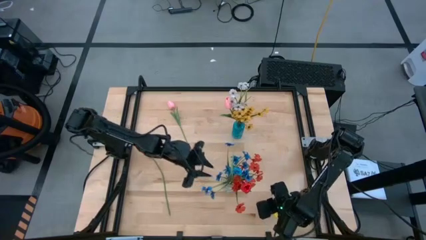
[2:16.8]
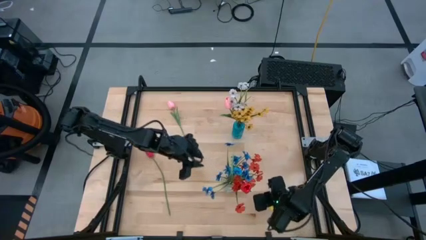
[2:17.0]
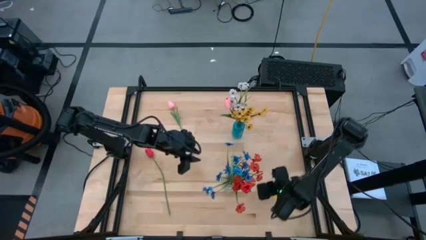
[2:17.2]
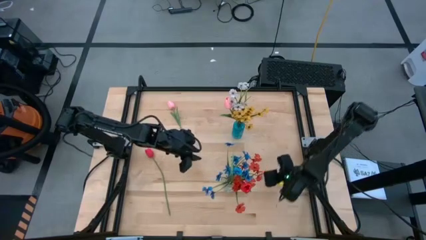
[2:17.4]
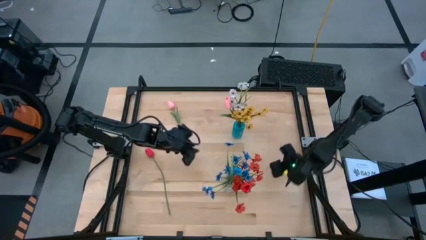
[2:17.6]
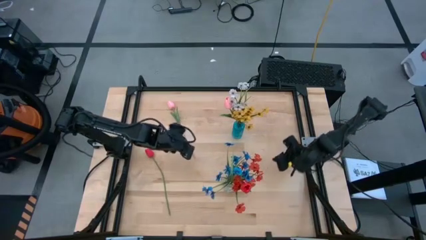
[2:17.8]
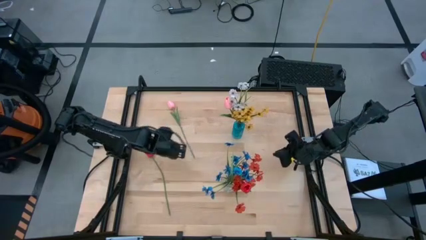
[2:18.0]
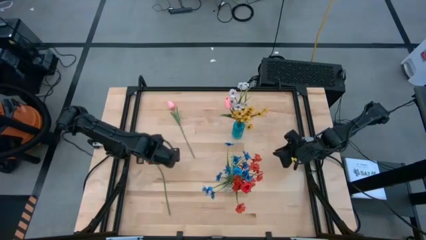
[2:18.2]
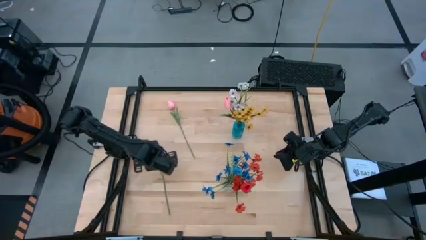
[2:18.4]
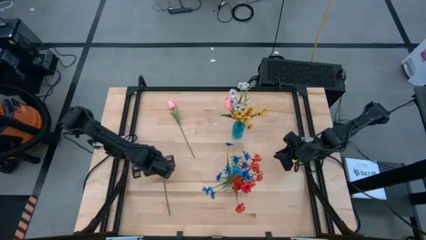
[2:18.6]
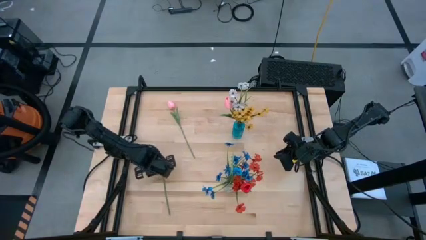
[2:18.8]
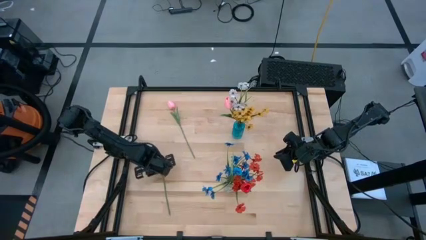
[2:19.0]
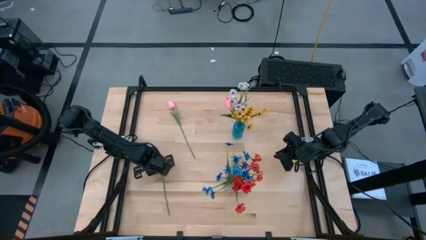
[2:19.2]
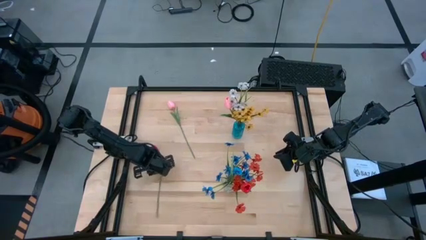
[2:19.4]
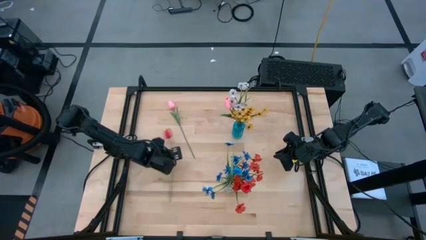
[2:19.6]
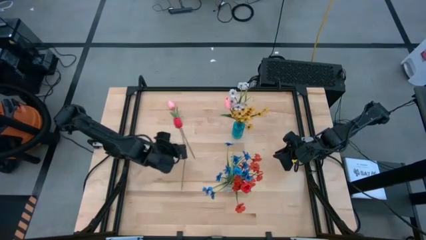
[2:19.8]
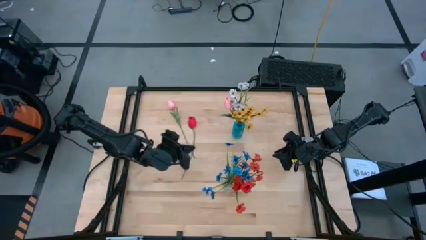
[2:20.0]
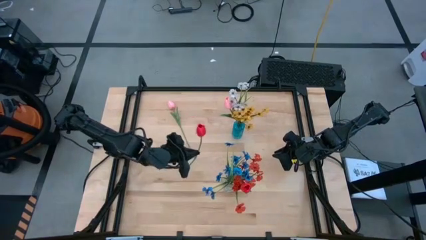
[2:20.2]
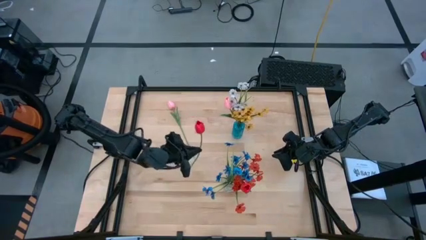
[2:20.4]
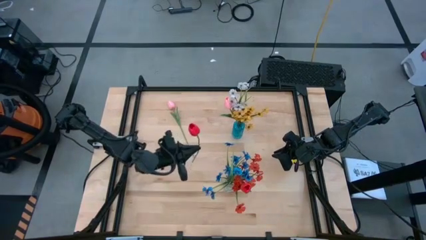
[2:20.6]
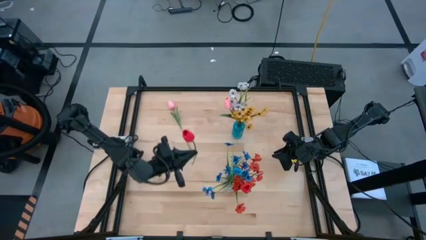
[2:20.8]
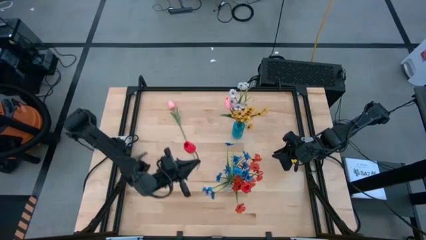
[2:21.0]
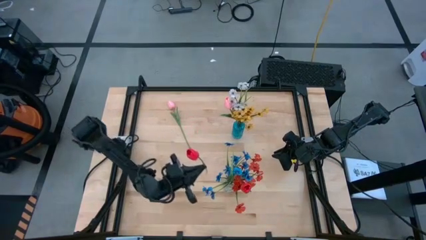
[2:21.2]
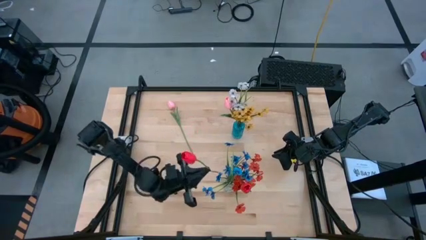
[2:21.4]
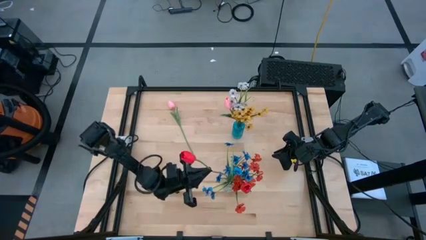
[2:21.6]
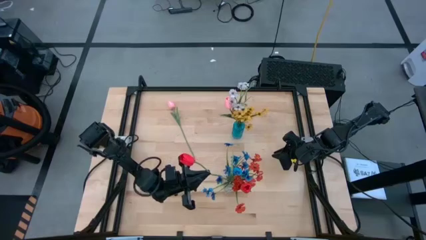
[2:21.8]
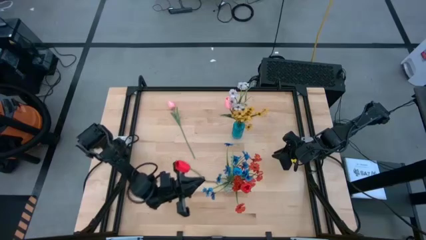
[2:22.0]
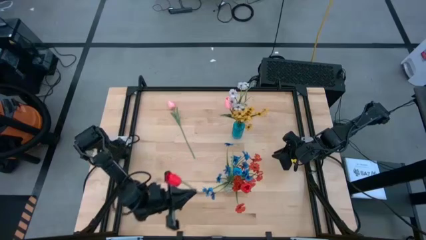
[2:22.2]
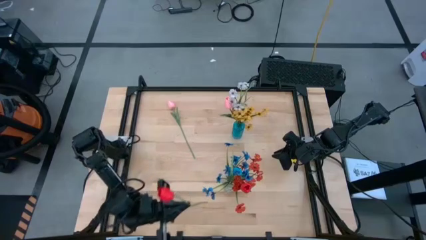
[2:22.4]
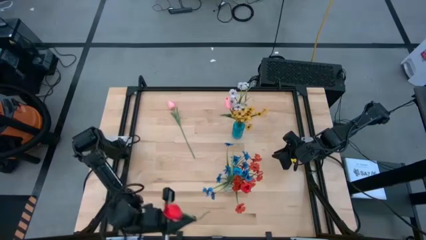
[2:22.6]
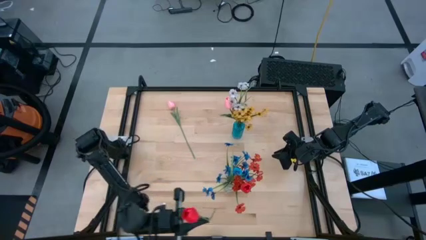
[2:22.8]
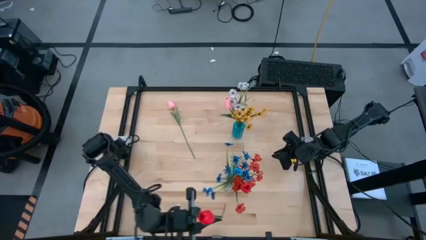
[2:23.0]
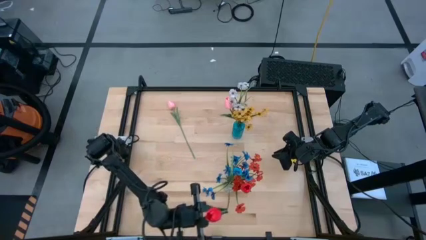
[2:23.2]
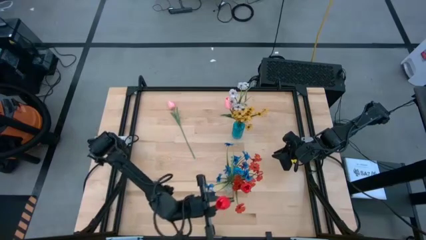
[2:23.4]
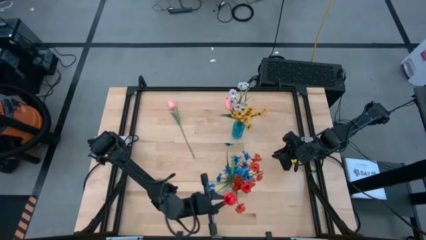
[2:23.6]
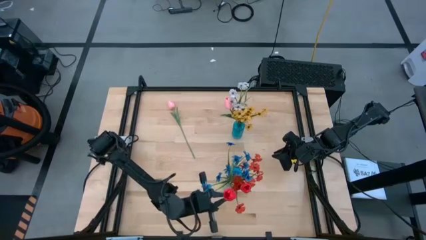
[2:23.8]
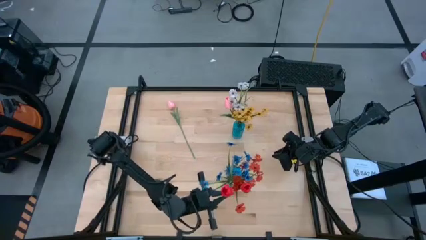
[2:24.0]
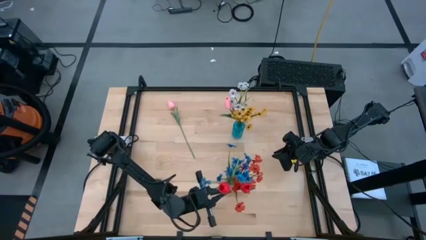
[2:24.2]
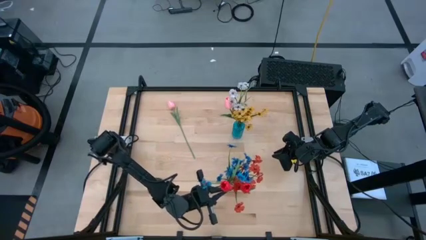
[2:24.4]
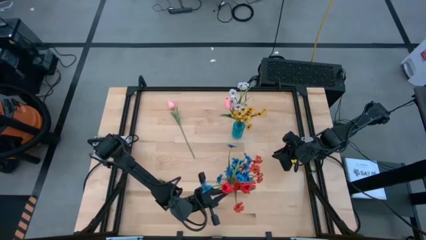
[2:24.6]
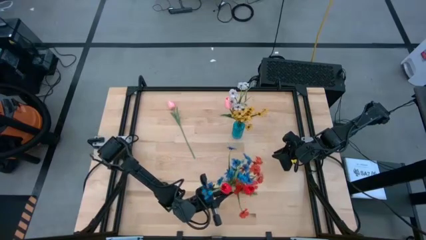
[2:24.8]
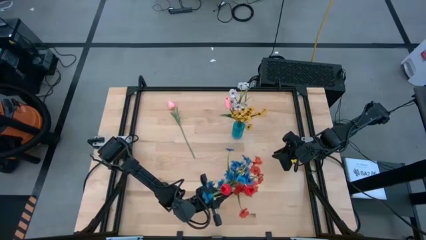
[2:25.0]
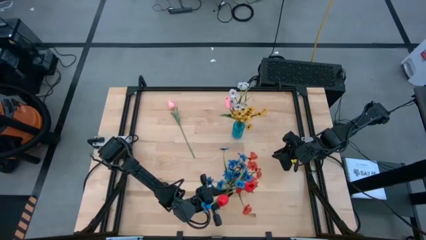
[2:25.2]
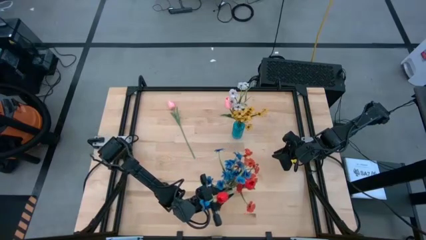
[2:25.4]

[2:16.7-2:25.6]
Task: Sort flowers into vase by color
Put the red tulip into the transparent vase

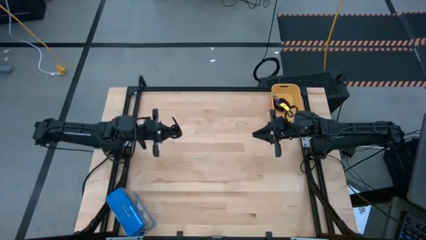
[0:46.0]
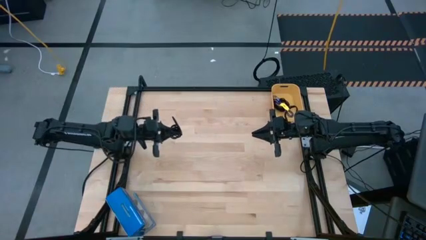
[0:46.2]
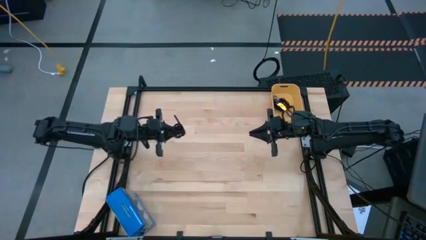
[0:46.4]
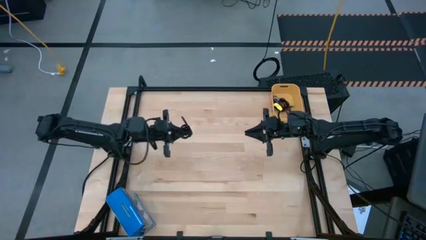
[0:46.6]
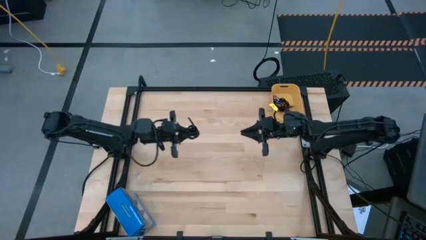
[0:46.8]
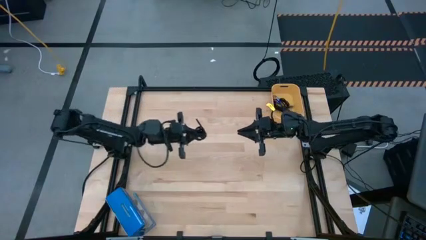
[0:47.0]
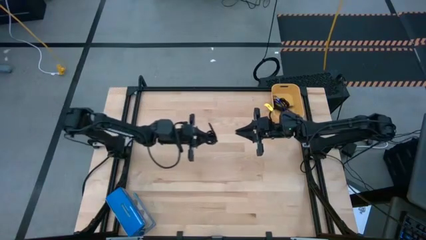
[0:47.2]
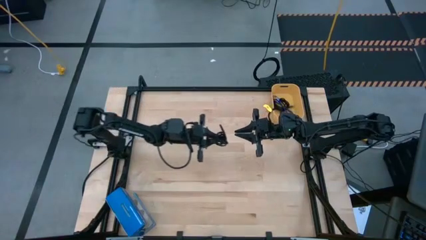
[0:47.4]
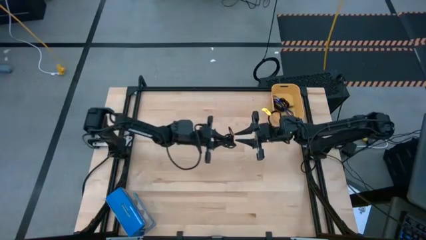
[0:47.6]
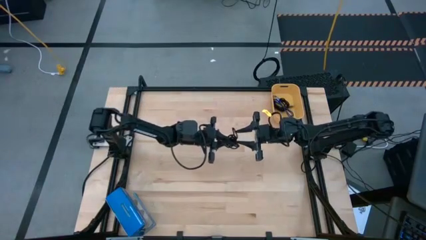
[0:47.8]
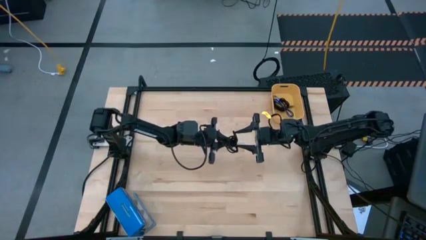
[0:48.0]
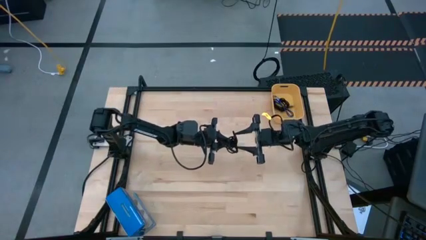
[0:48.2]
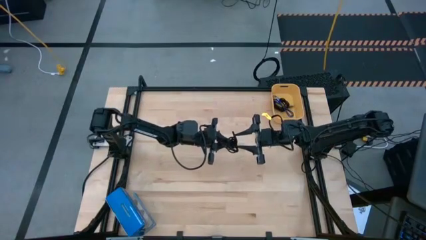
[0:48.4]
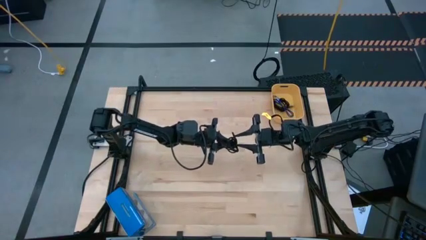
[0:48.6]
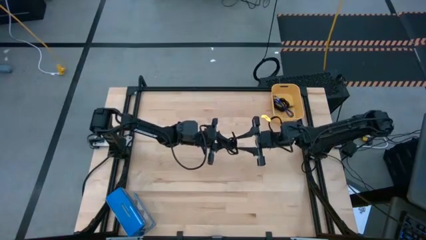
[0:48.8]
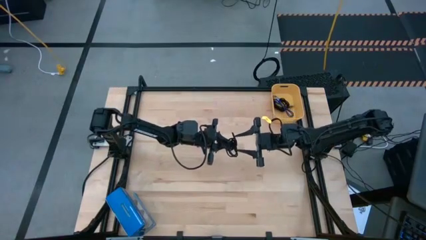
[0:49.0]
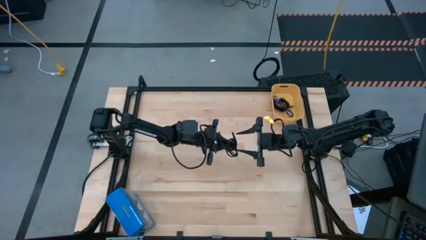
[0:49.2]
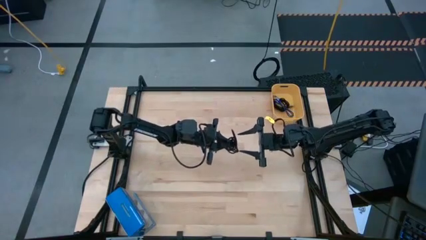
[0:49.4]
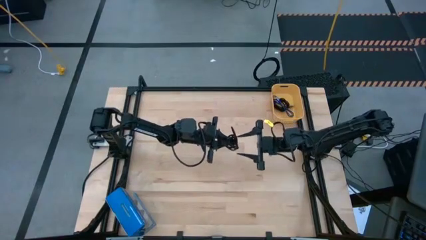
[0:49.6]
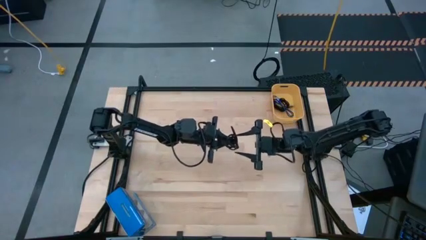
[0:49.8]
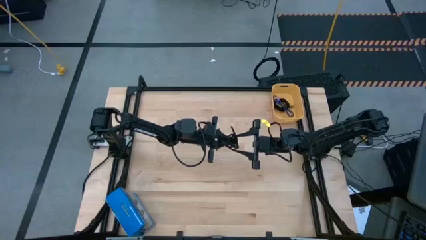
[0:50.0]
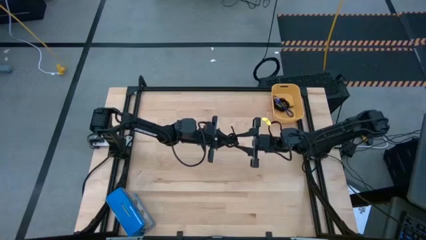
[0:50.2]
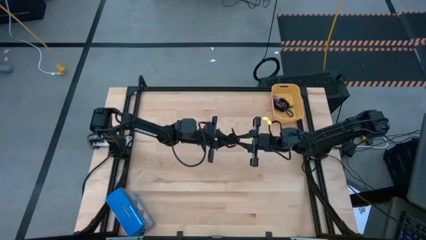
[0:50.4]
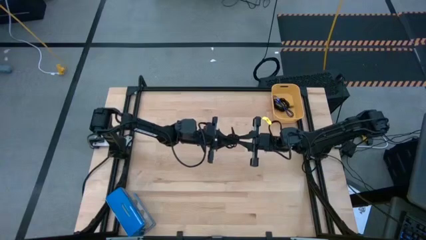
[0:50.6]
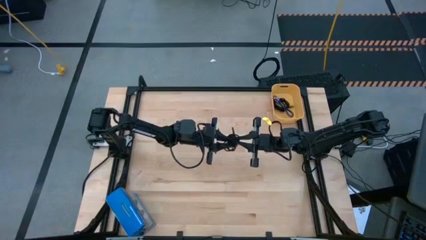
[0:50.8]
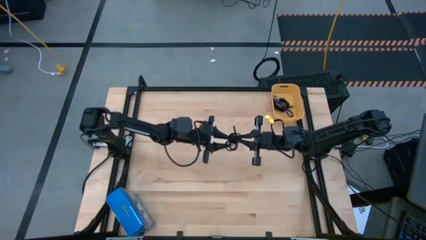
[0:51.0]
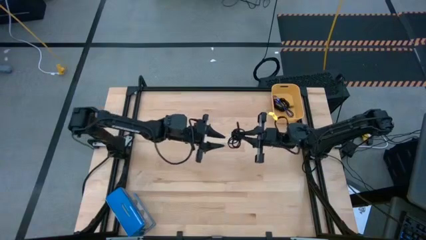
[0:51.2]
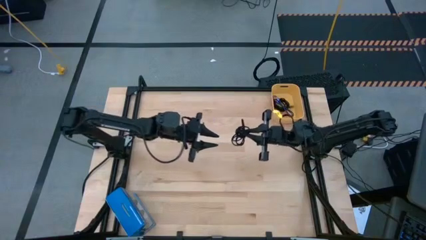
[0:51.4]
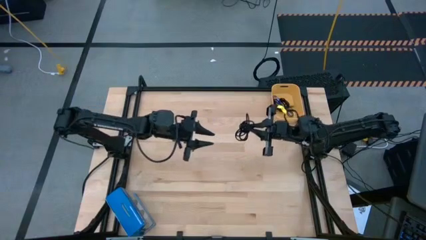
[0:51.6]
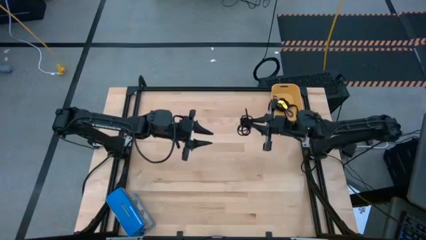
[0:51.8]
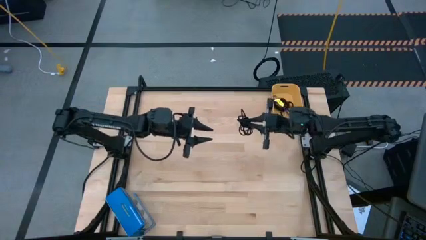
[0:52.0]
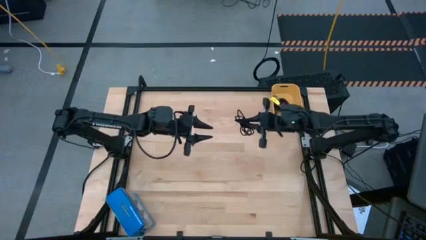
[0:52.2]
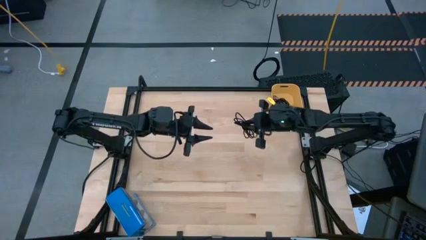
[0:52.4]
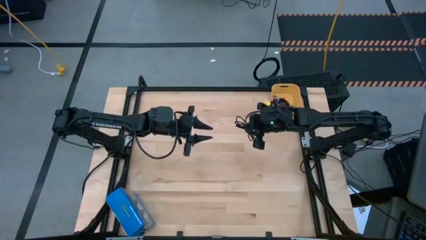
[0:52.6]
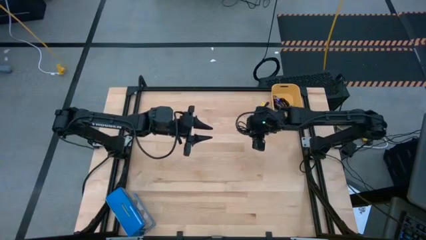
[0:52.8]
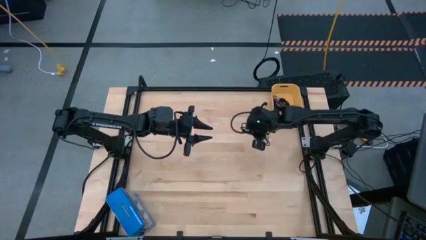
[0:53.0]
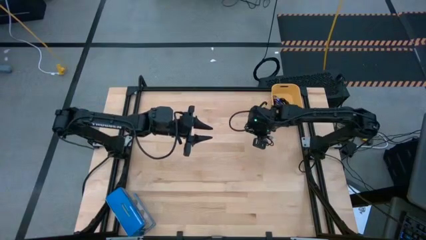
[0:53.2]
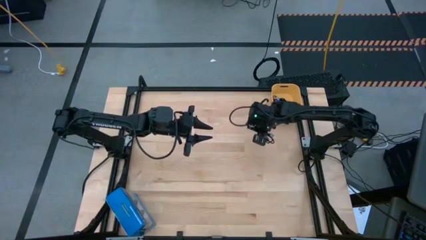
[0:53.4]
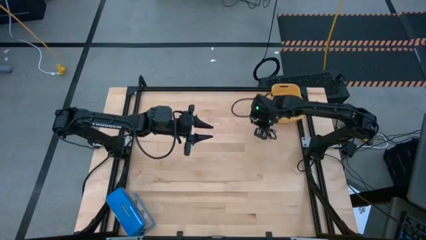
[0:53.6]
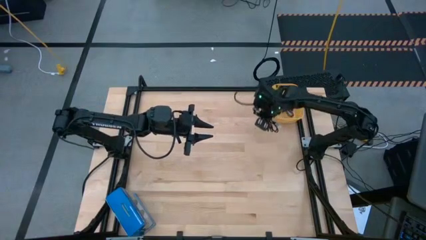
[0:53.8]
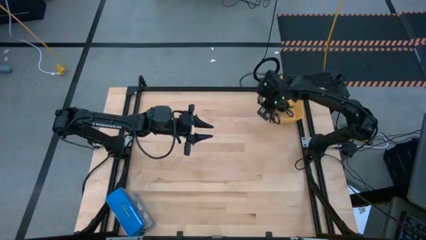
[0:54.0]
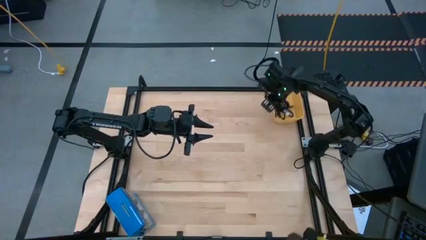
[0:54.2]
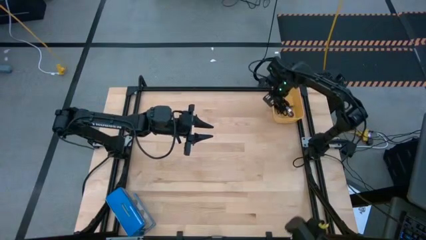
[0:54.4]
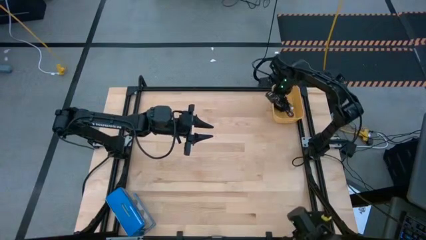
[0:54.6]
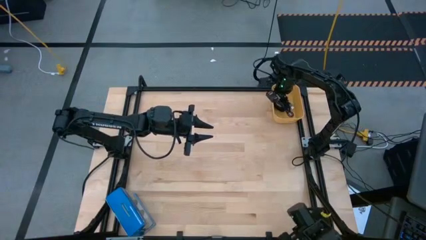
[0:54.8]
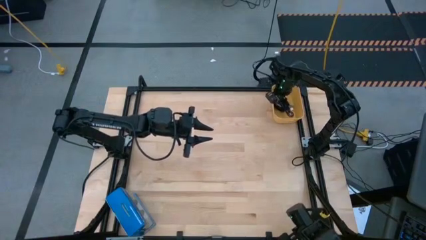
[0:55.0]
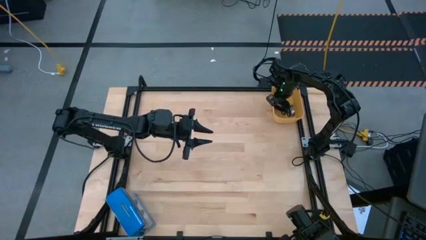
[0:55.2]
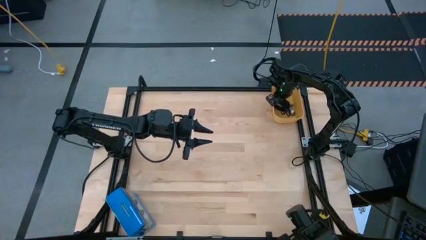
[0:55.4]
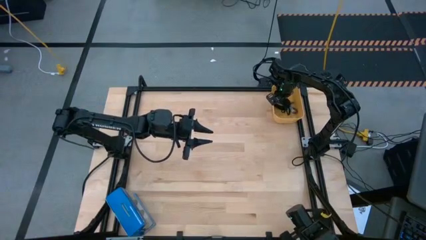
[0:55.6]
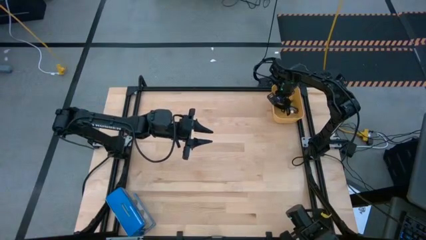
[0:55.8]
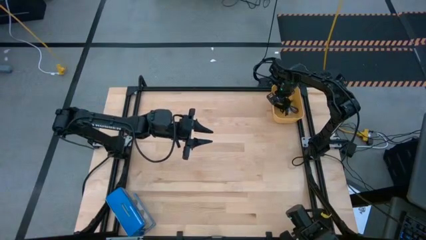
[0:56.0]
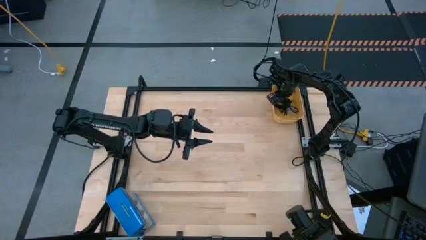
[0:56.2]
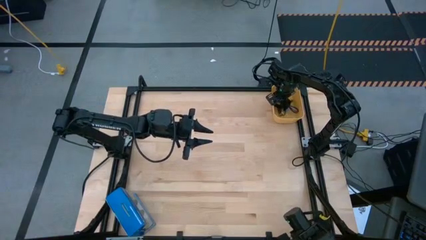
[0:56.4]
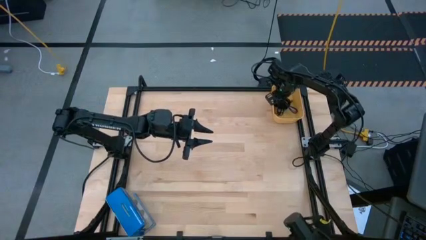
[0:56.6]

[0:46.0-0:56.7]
Task: Pick and place USB-C Cables
Put the black charger cable into the yellow bin
